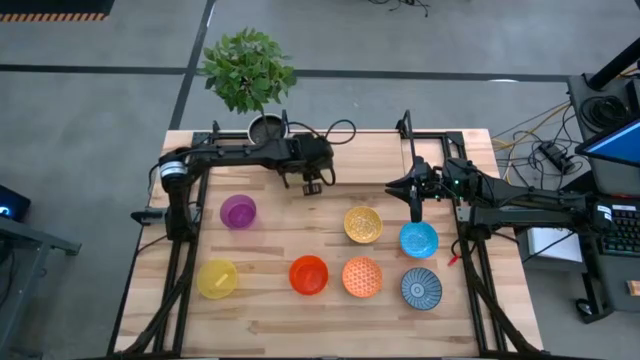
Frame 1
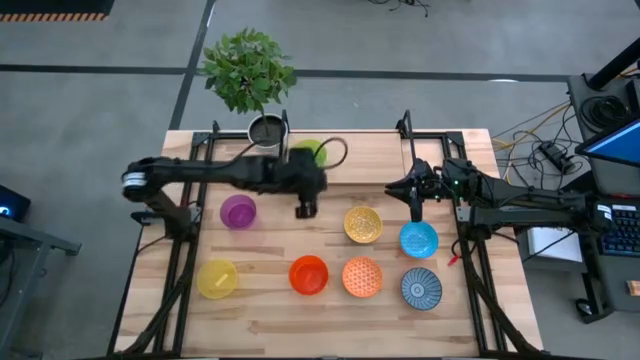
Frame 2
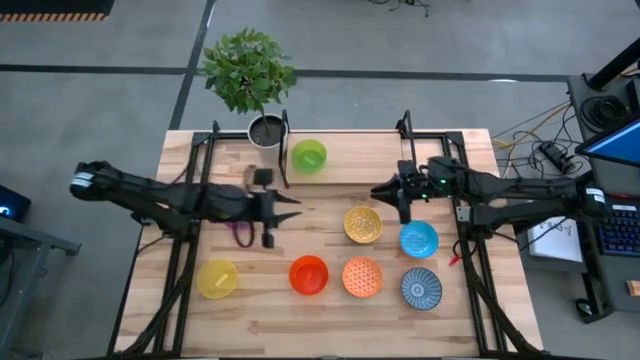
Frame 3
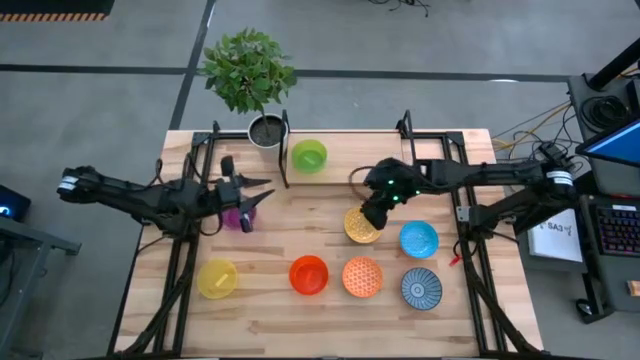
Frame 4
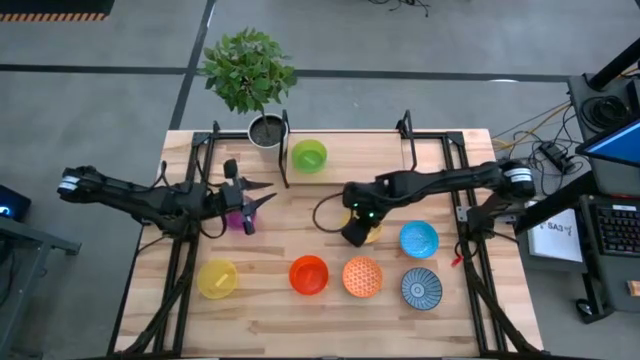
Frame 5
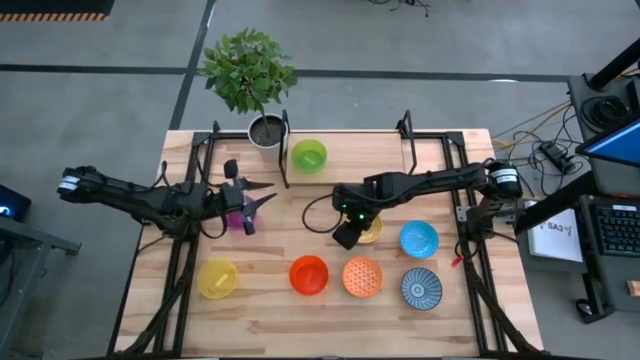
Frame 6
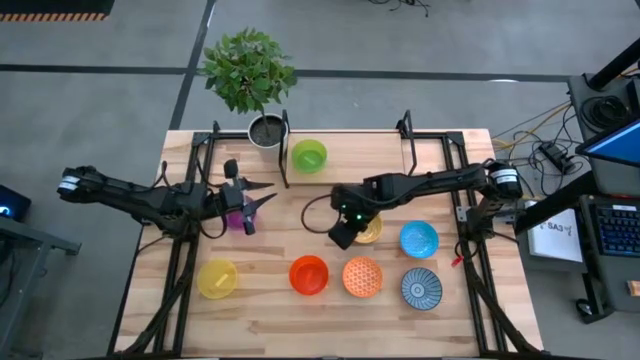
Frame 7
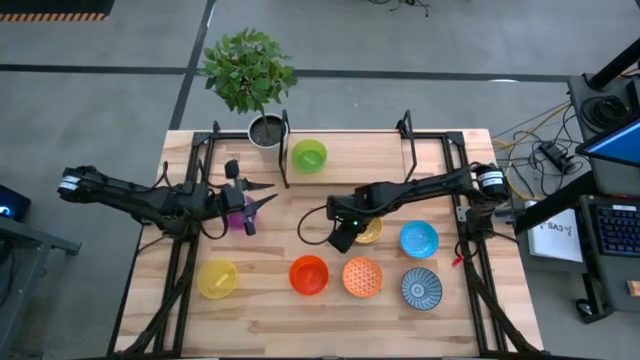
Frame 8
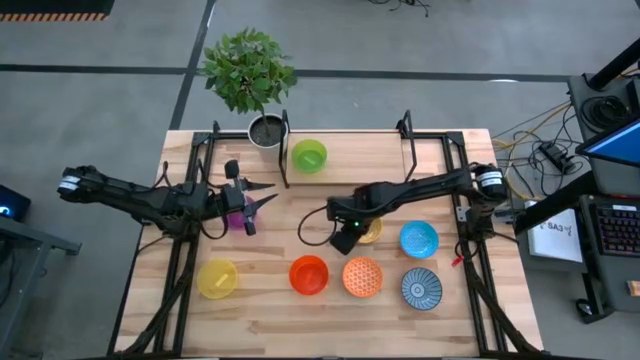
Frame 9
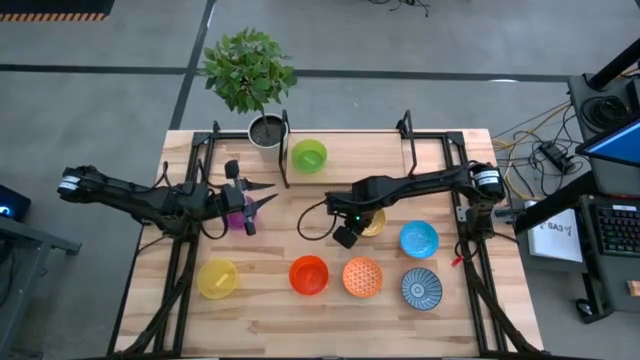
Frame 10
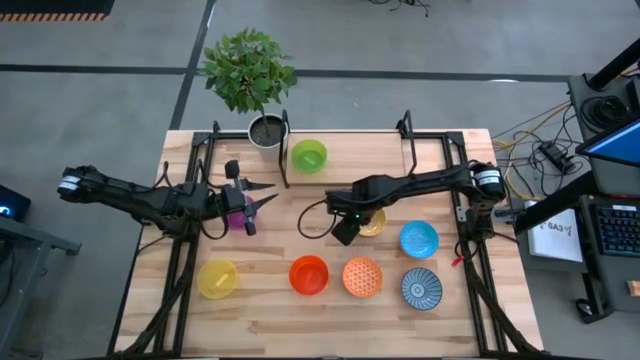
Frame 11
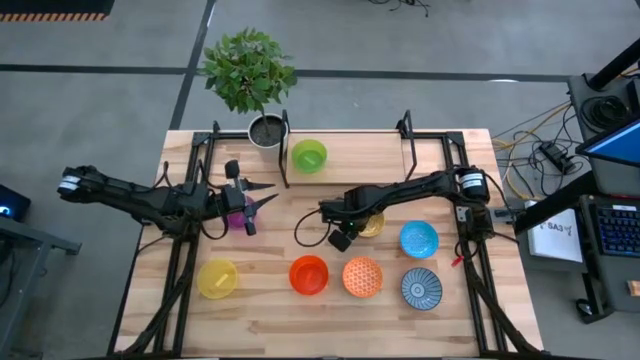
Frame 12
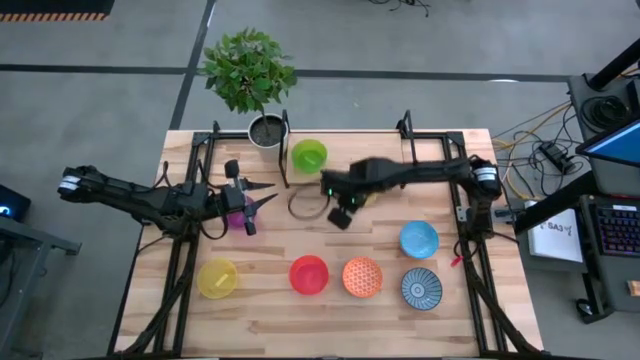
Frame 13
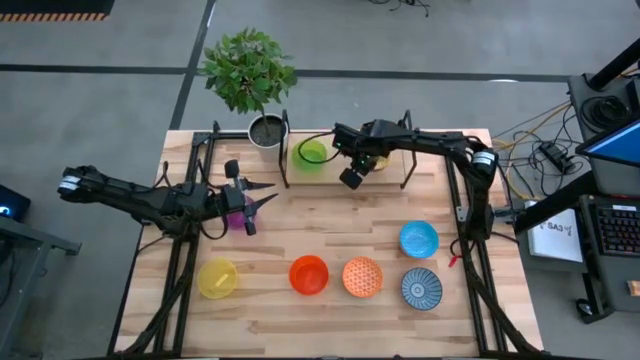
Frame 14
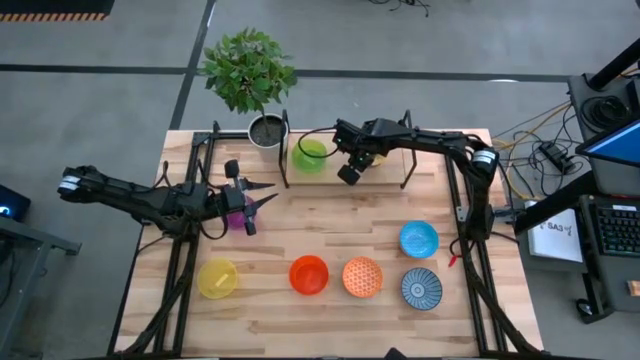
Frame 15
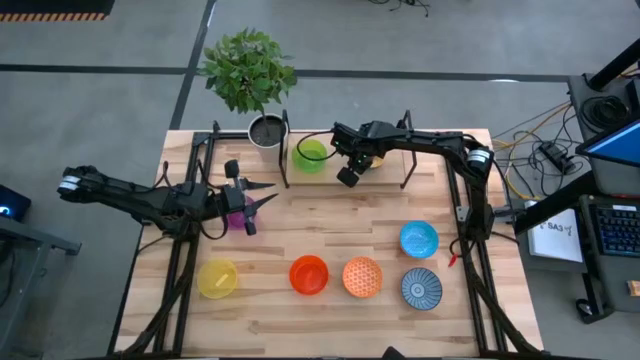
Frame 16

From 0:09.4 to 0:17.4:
Task: Place and stack bowls onto a shelf
Put the yellow bowl on the shelf

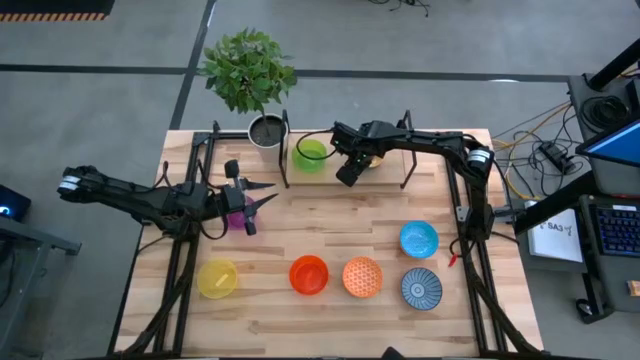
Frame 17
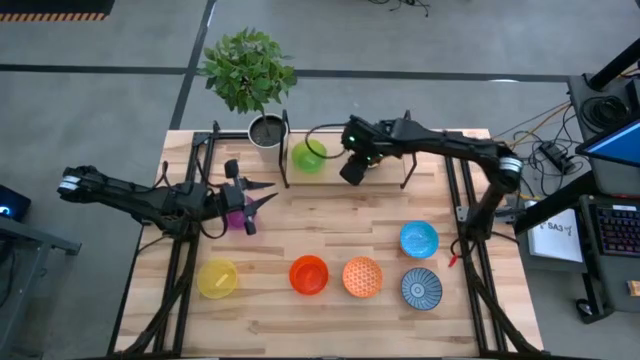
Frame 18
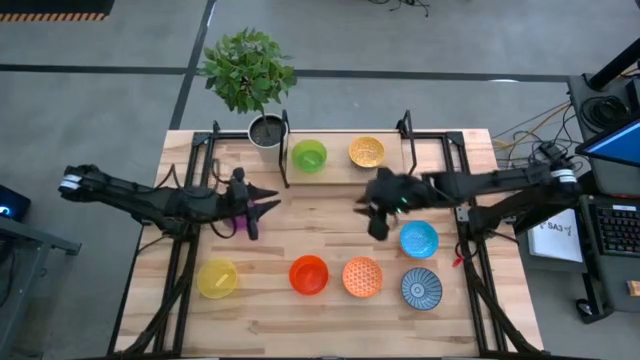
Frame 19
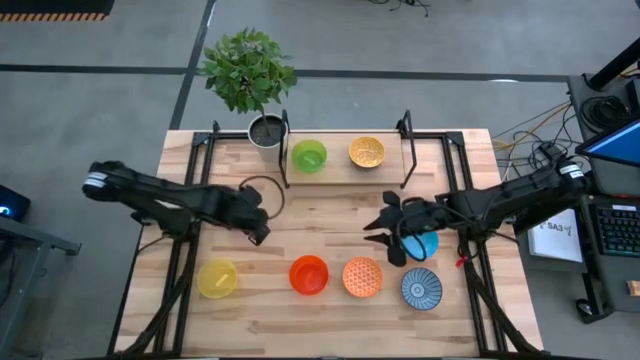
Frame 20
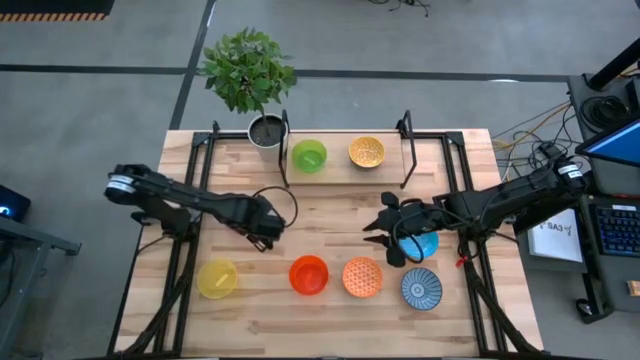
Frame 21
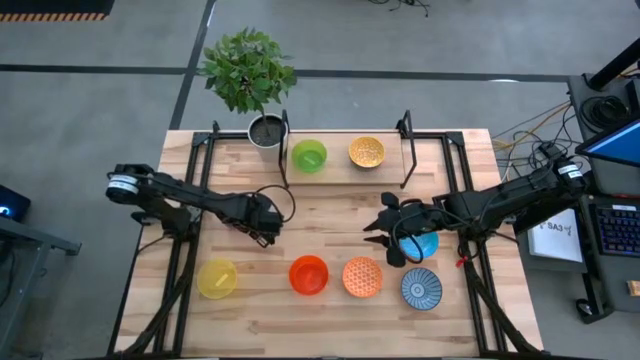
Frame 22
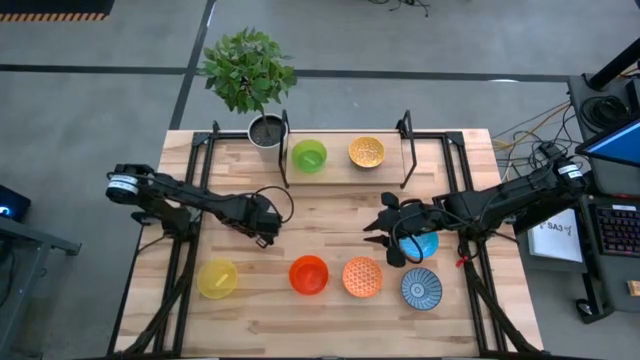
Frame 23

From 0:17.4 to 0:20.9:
Stack the purple transparent bowl on top of the green transparent bowl on the shelf

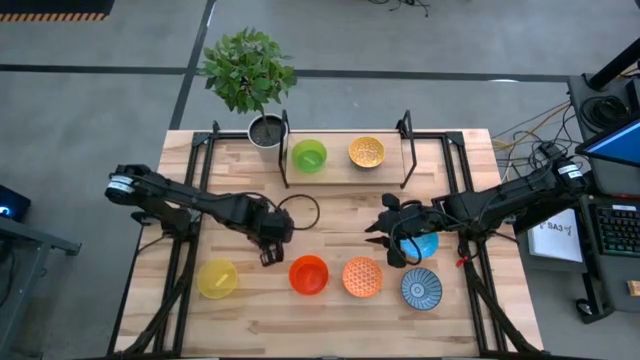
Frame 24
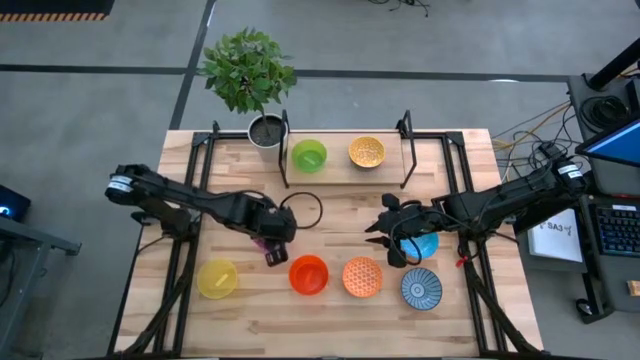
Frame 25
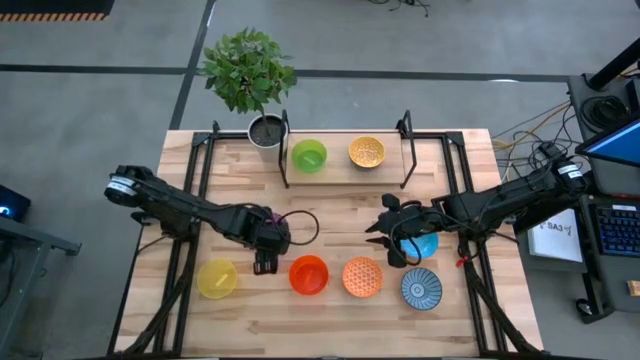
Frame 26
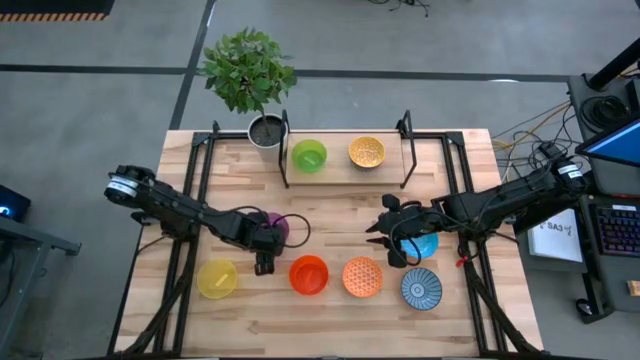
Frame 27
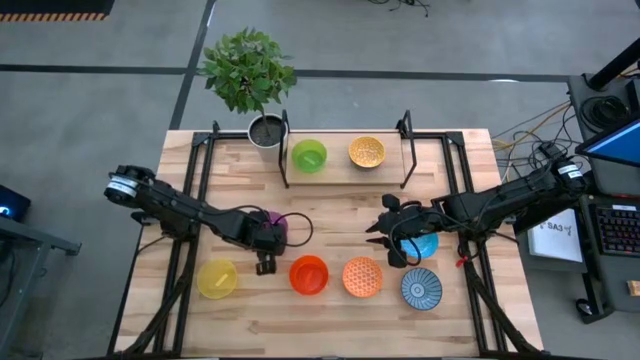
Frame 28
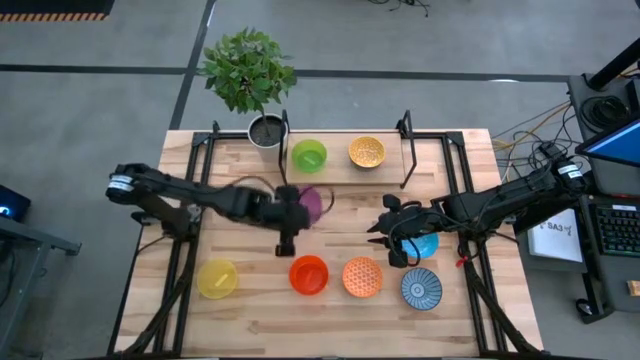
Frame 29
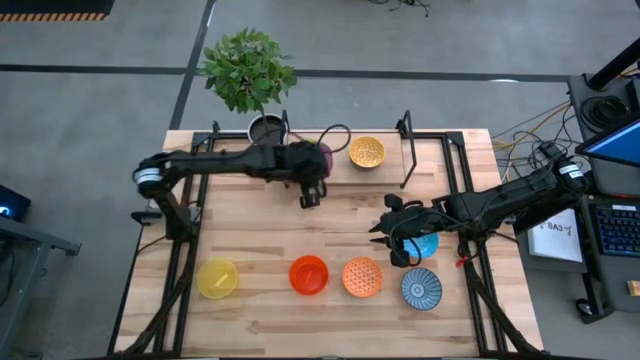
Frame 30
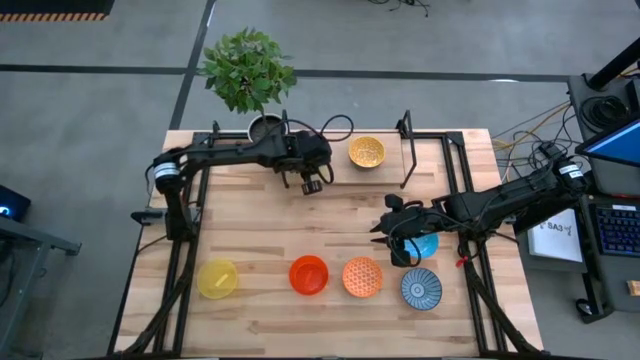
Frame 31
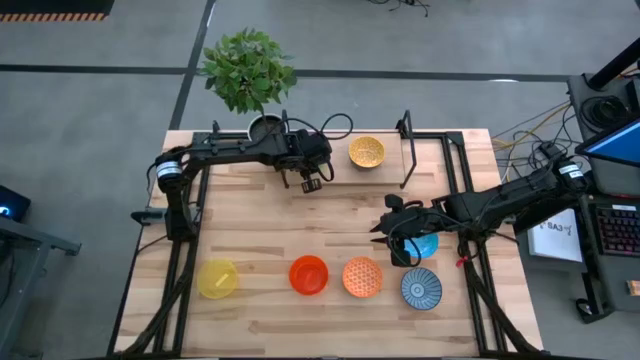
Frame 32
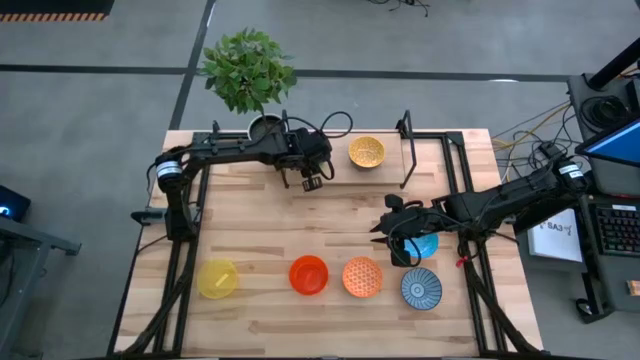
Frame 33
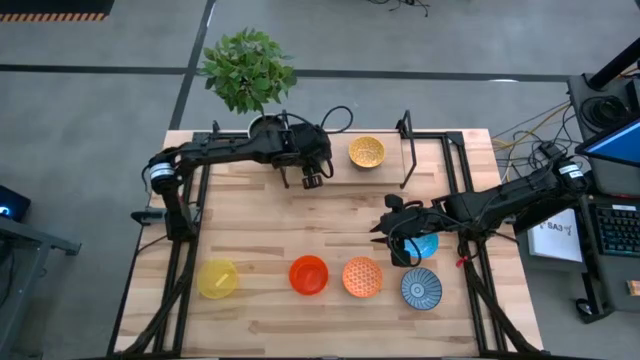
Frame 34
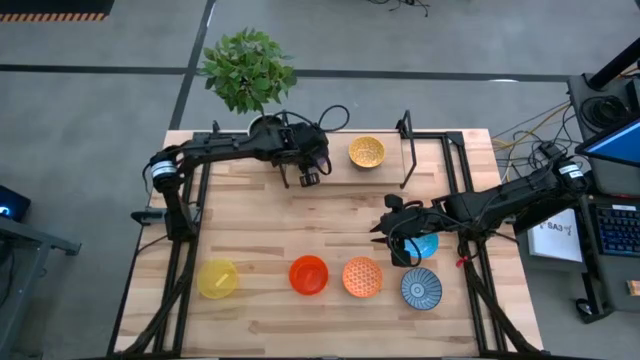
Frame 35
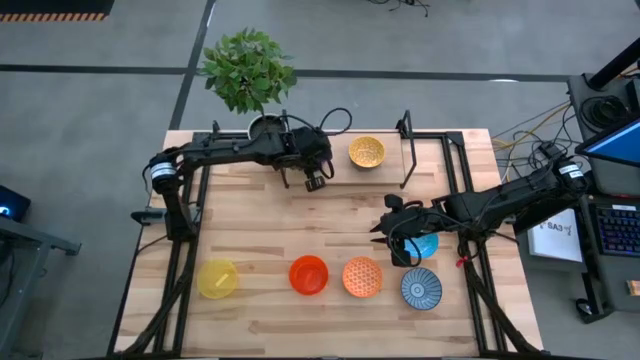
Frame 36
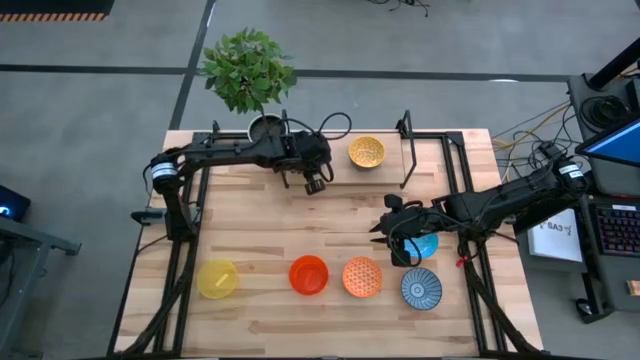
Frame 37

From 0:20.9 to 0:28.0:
Stack the purple transparent bowl on top of the green transparent bowl on the shelf

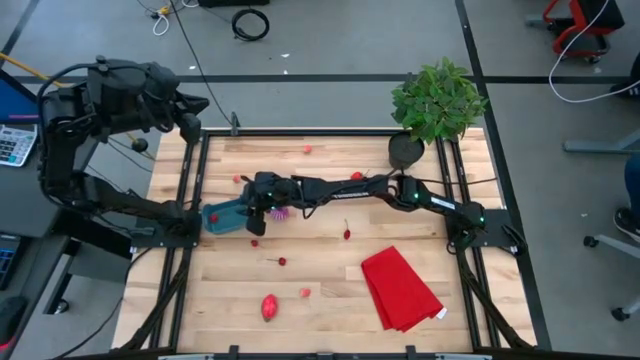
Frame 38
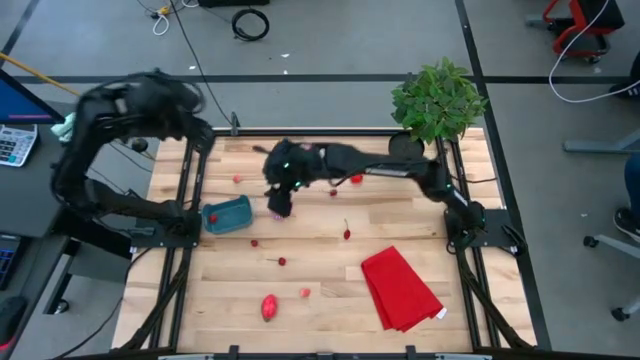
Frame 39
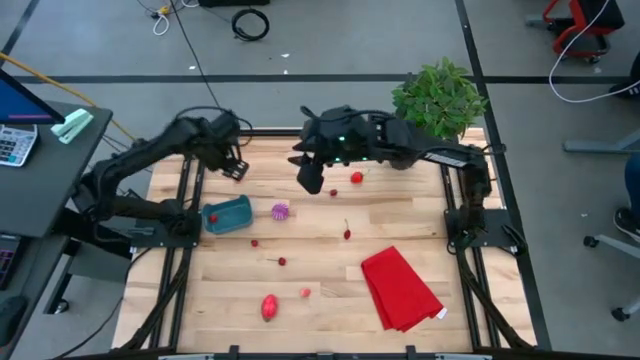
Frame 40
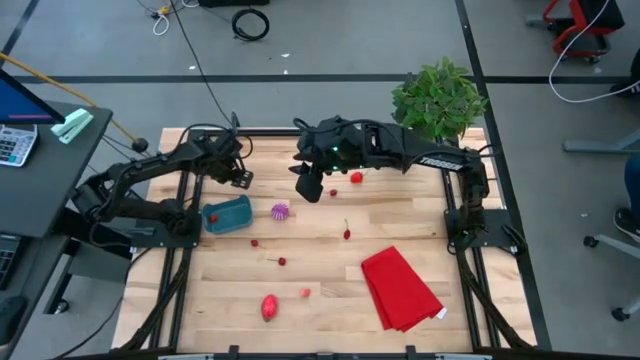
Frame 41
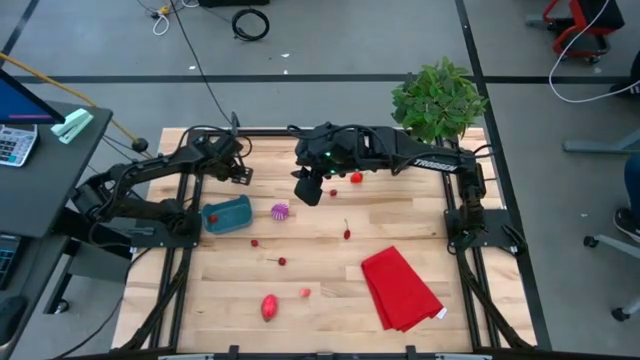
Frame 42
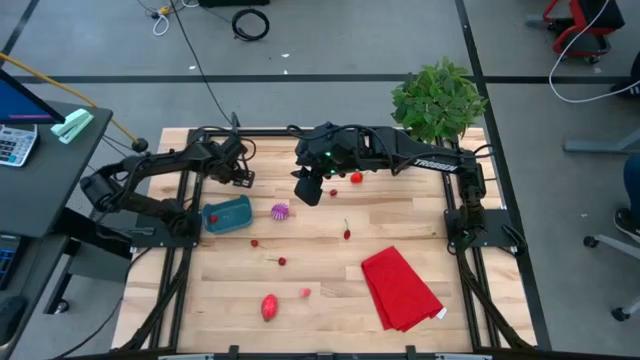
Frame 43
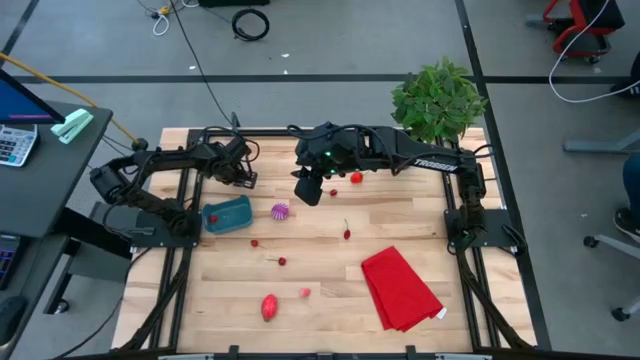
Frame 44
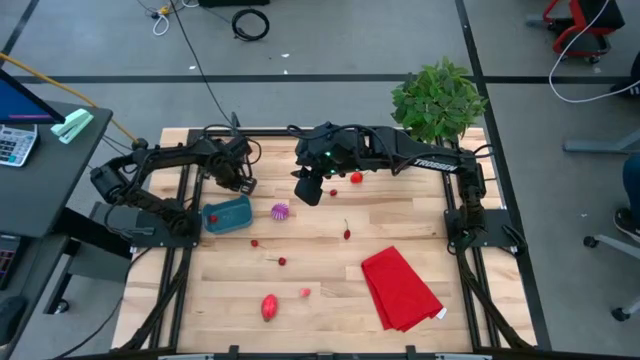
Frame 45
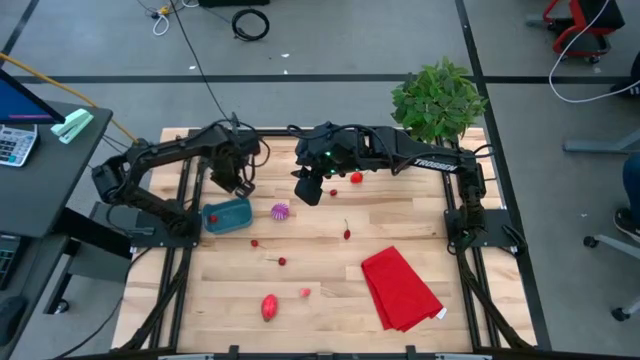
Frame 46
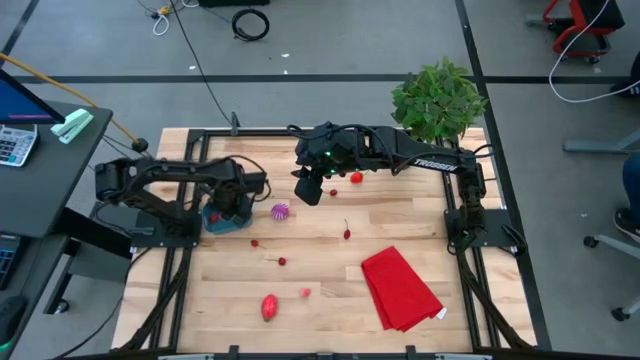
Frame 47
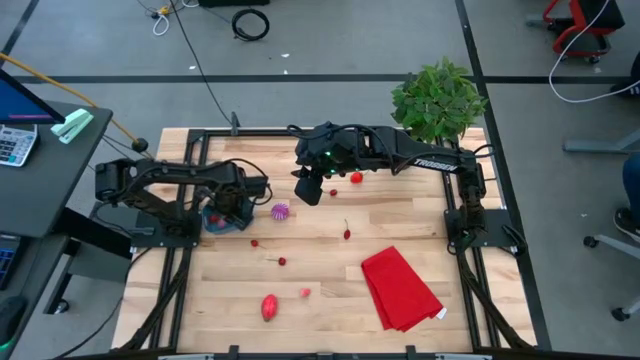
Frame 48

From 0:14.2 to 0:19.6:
Task: Pick and placing Produce into tupperware
Put the middle left pink peach into the blue bin
